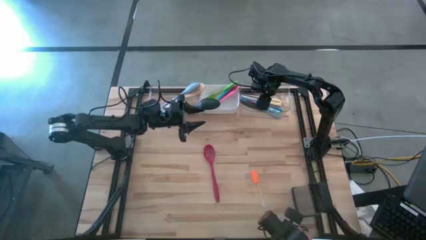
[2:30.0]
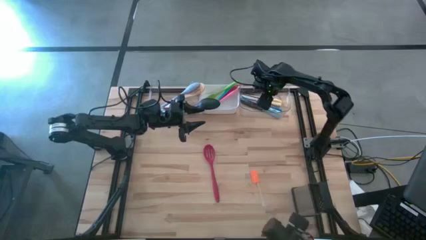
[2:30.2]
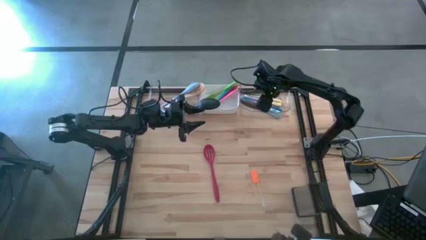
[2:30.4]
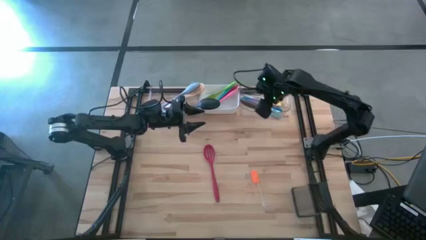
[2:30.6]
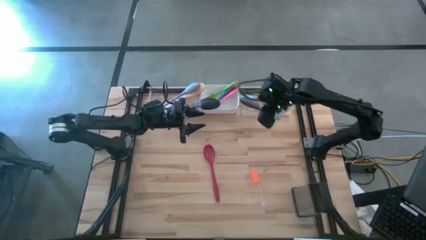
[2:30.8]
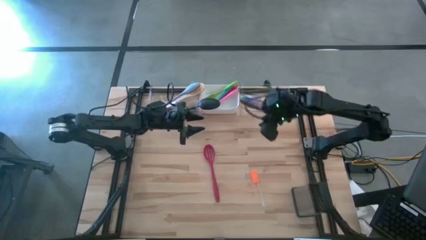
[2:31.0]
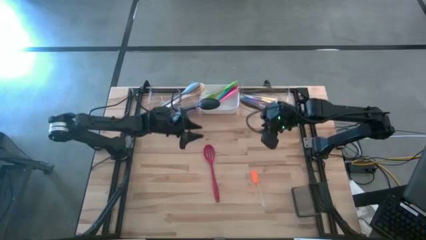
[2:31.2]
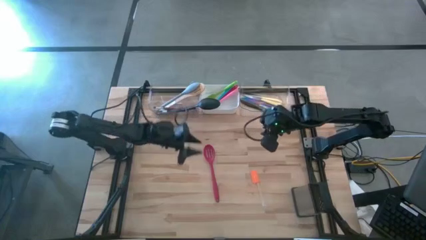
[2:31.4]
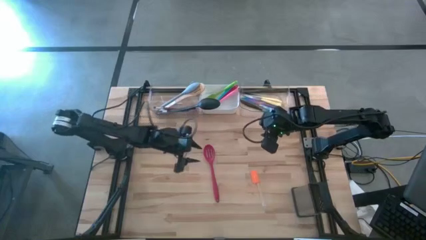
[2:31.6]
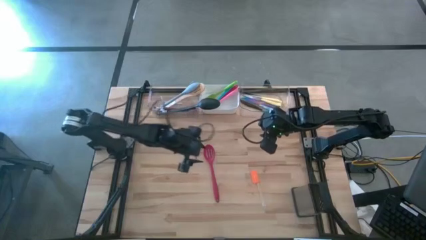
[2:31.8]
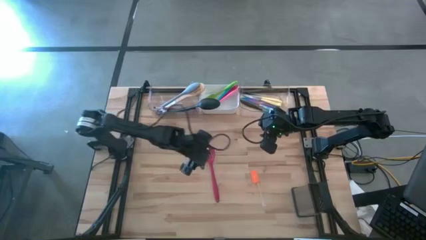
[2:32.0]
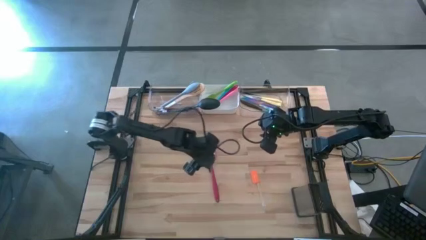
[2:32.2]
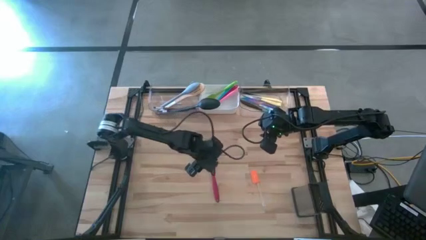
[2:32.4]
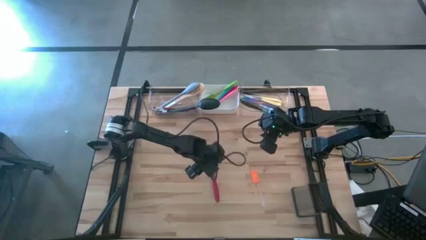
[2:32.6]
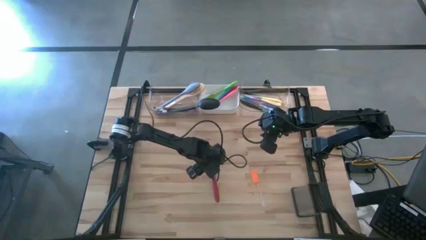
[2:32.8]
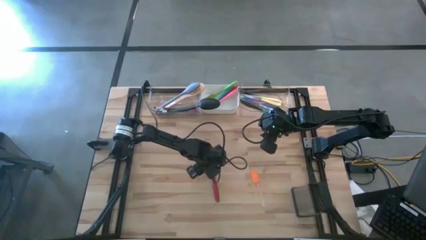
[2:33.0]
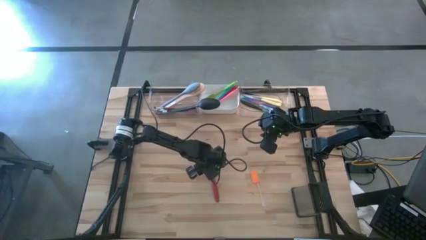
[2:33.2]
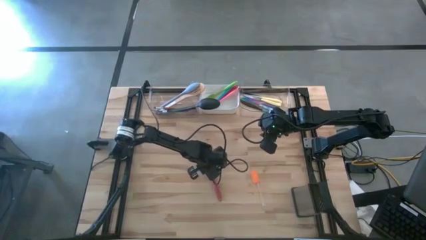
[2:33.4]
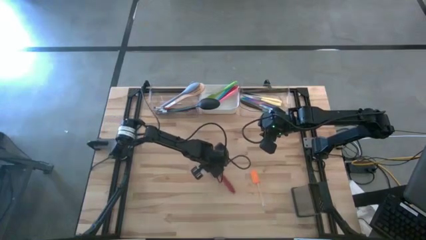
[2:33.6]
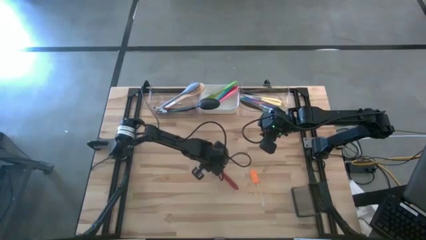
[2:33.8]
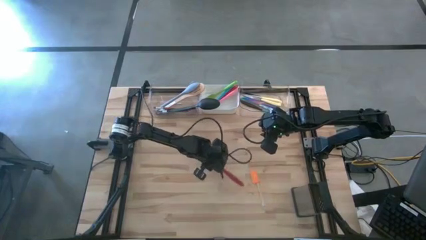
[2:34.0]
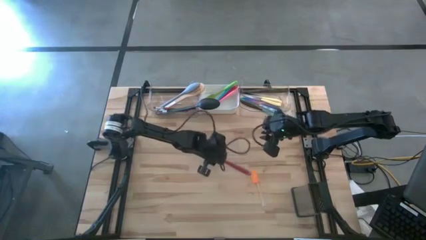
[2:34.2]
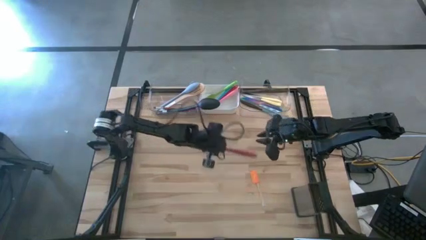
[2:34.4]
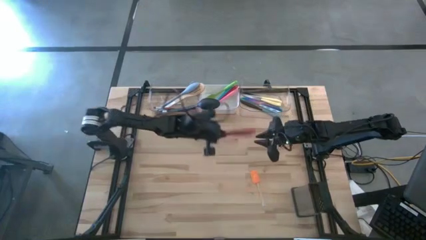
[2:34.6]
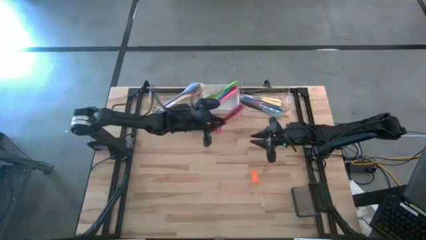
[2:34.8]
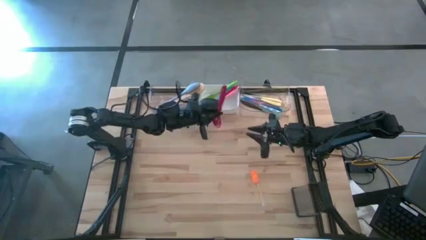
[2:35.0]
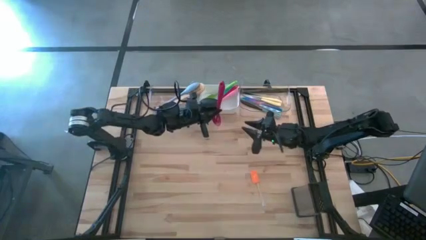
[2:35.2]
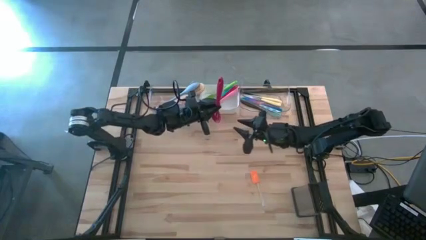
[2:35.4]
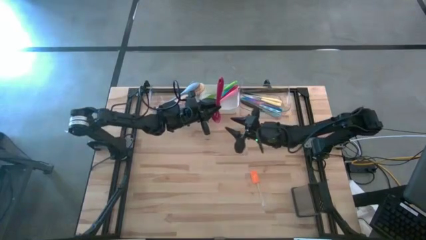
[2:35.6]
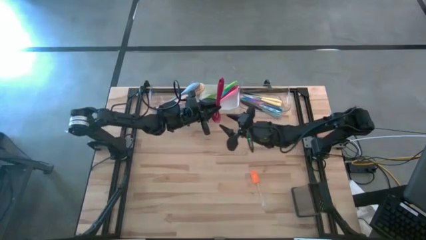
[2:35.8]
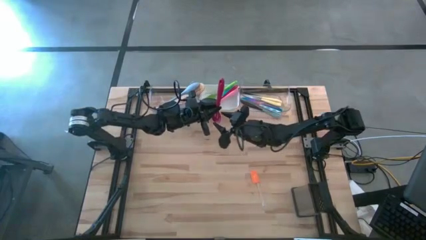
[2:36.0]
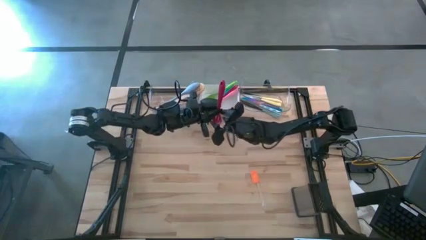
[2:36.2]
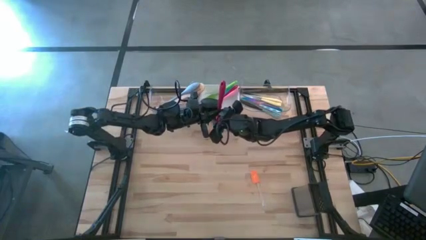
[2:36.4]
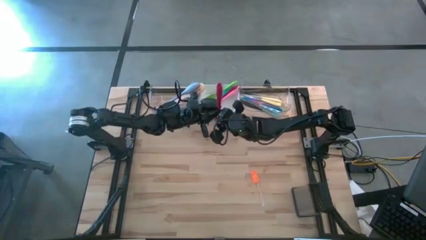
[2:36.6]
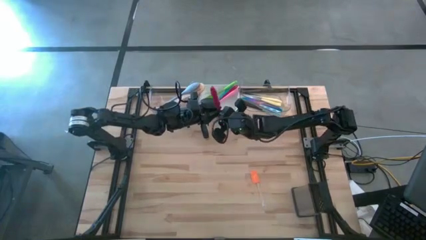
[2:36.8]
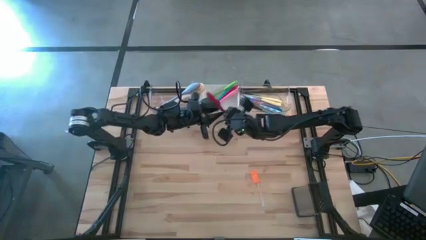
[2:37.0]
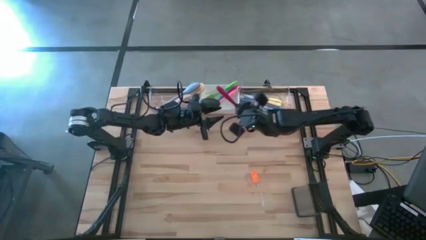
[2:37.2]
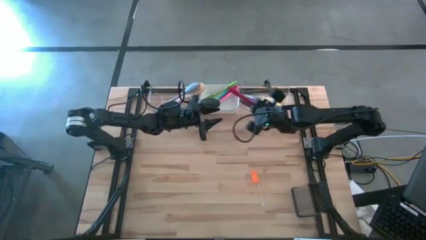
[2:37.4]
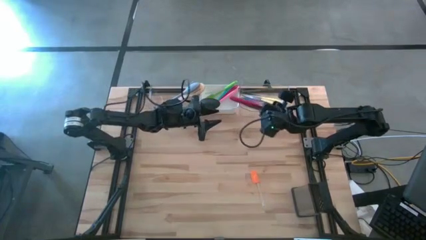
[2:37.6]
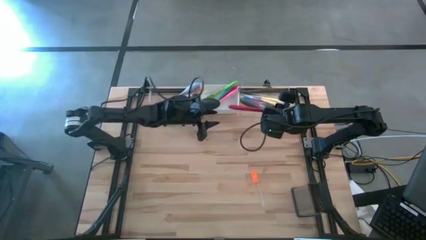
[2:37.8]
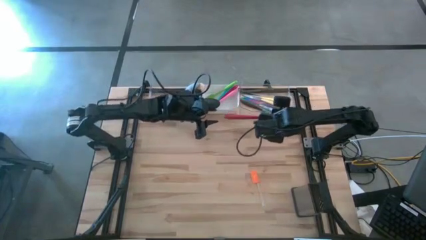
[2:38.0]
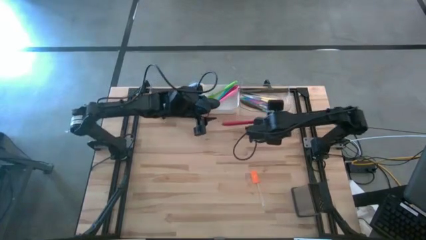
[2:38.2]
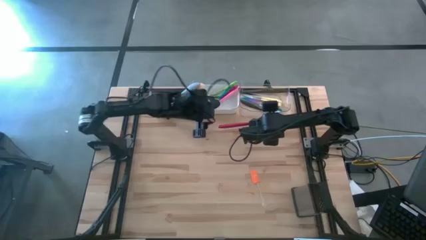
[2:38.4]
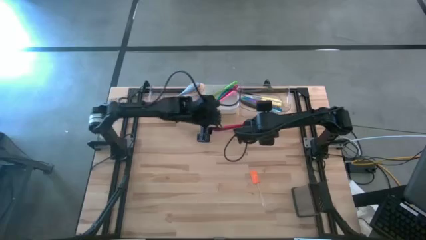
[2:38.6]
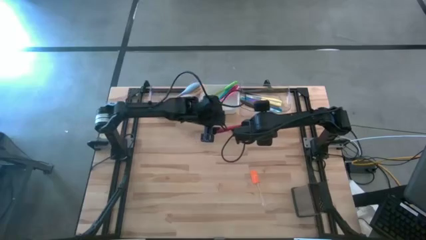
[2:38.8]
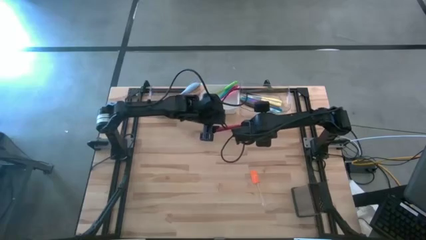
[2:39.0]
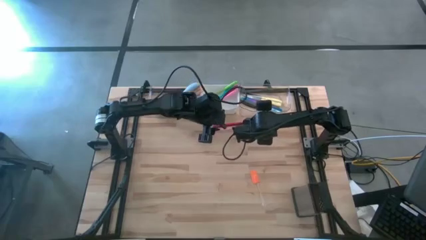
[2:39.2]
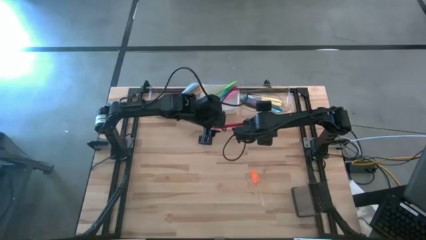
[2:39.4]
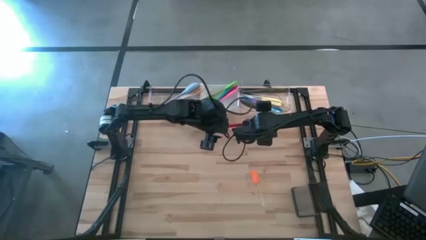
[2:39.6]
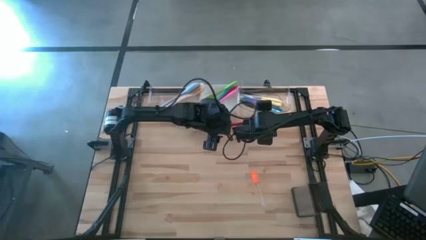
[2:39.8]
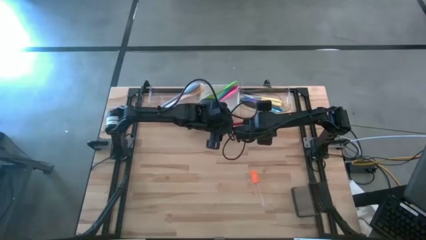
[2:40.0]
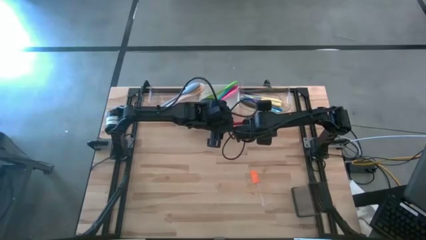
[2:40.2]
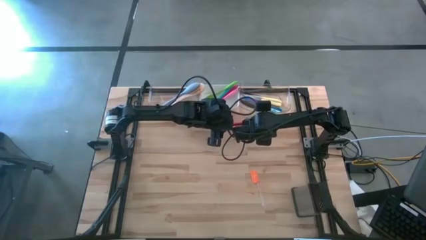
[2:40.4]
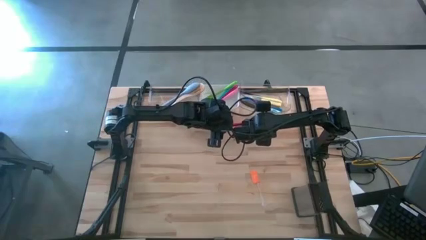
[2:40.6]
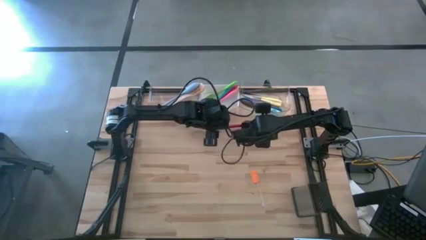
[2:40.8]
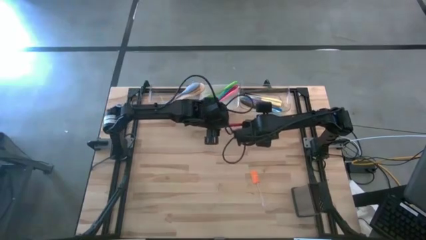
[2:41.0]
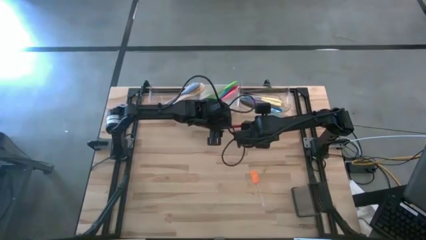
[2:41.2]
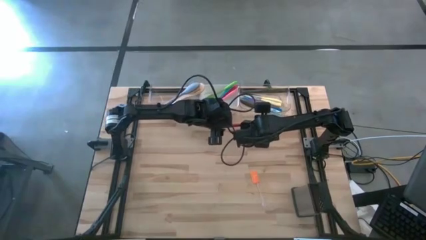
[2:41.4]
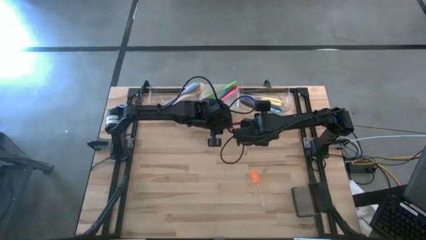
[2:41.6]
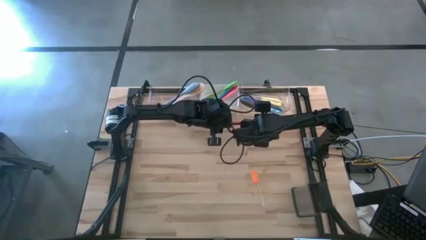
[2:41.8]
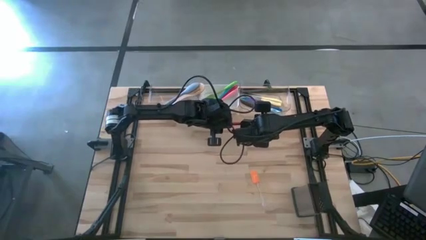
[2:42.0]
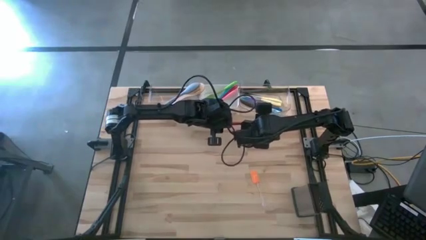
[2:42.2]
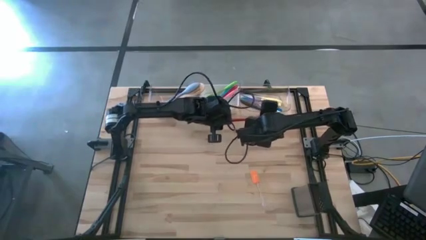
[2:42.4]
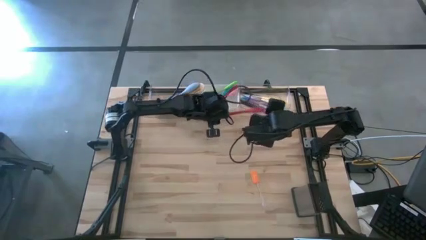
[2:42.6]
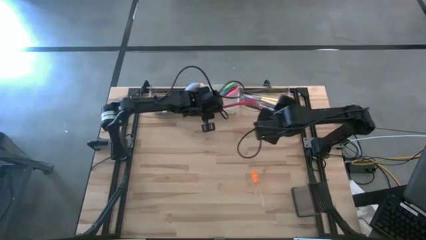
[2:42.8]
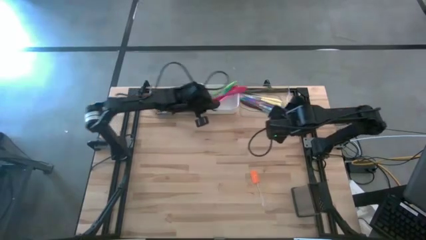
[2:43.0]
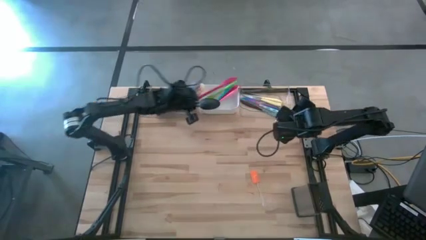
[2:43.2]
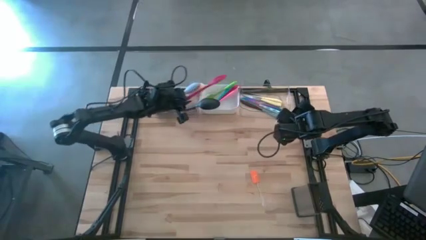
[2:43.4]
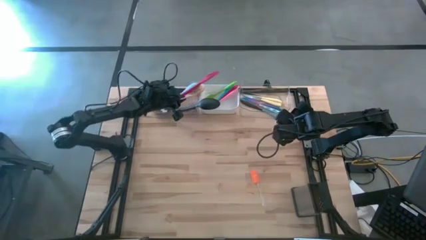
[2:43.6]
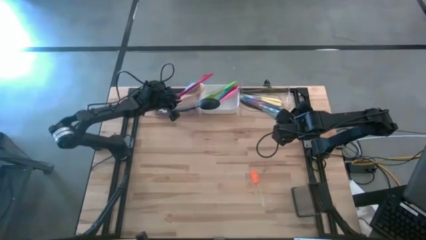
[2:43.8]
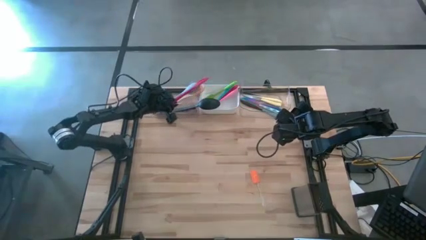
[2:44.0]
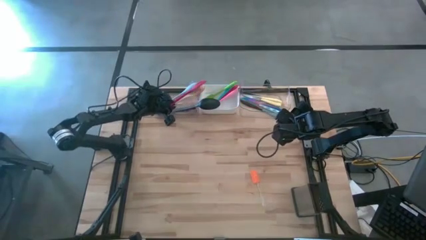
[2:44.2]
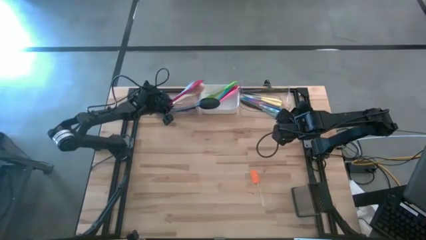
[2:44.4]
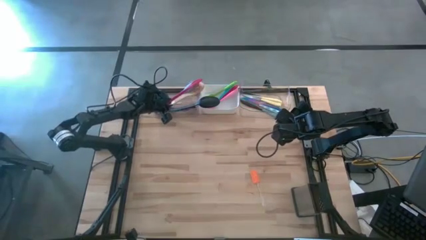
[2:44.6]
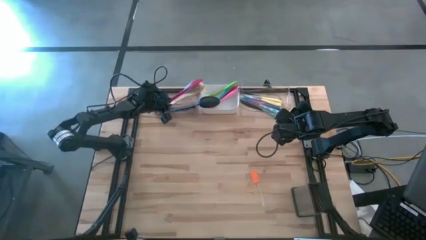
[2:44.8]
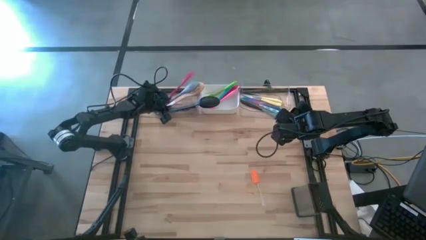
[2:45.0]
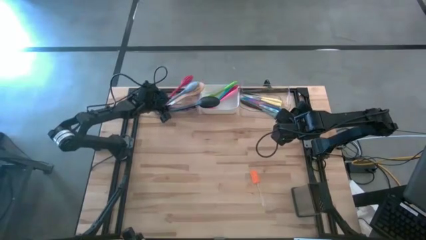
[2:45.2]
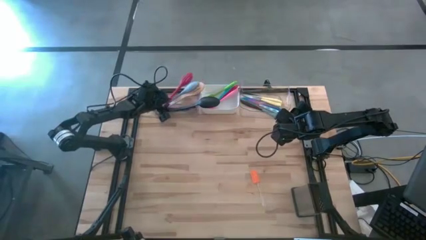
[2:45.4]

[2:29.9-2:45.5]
Task: Pick & Place Kitchen Items
Put the red cooking spoon into the left transparent bin

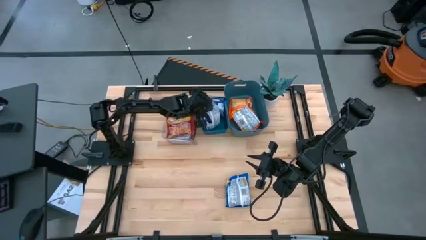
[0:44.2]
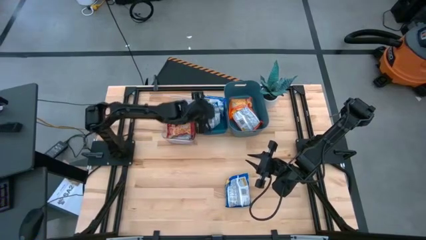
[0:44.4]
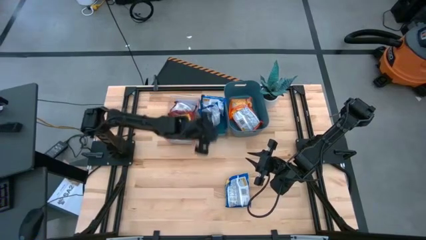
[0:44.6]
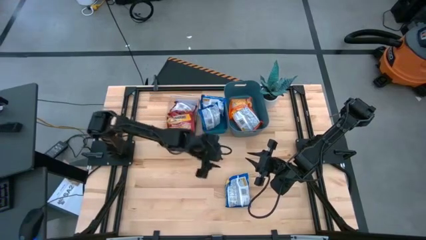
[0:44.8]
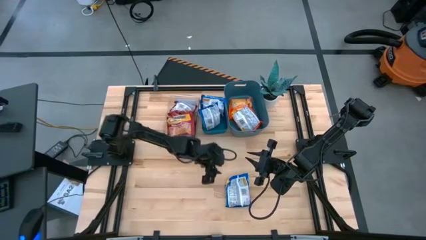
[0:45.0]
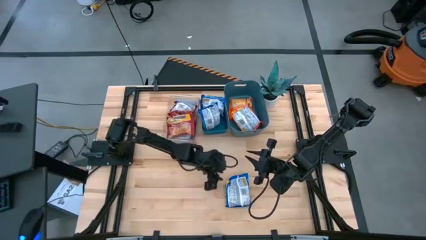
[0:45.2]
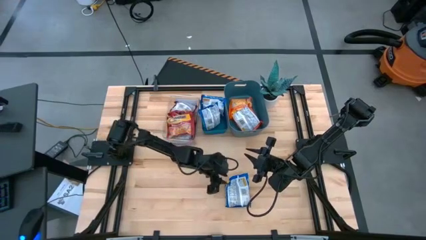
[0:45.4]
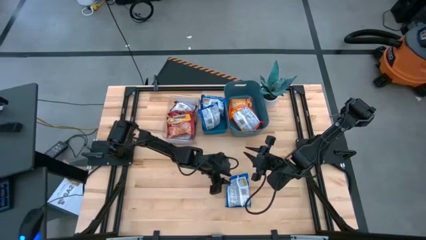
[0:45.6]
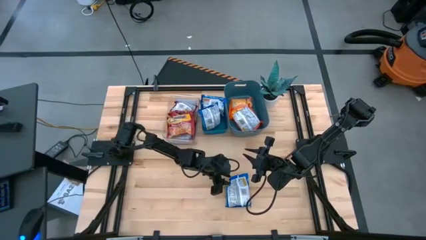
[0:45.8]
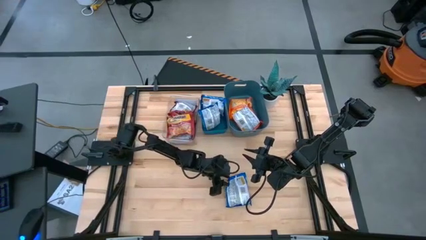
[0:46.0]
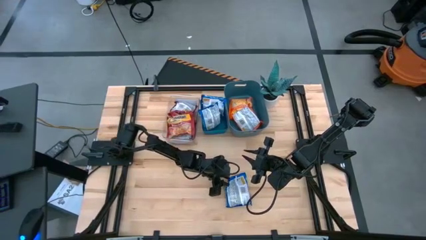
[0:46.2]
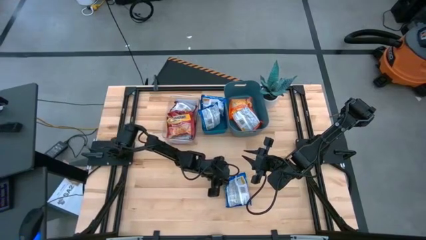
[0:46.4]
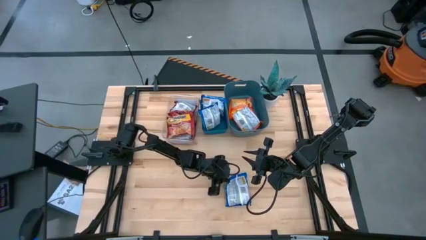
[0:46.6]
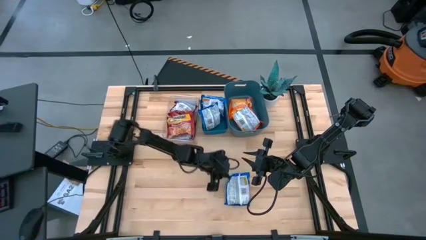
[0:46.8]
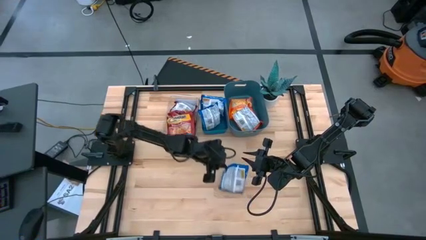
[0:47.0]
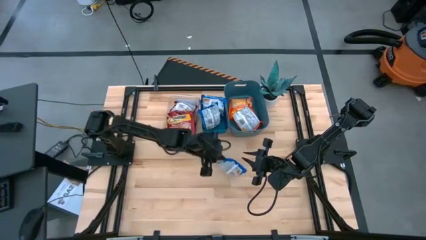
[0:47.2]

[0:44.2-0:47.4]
Task: Sort Maruchan noodles
Put the blue noodle pack into the blue bin
